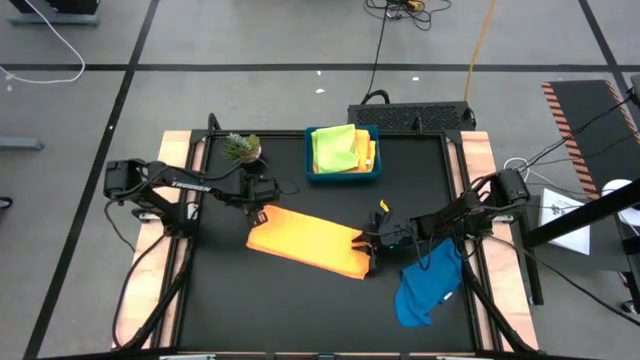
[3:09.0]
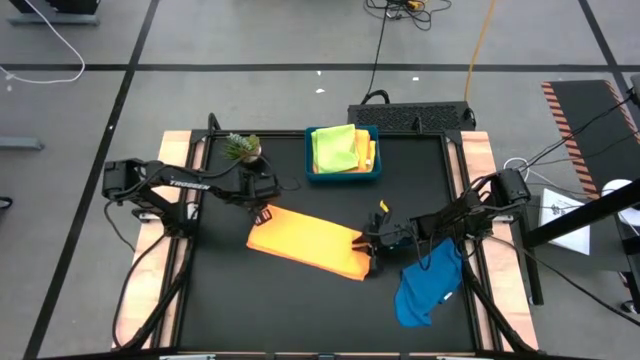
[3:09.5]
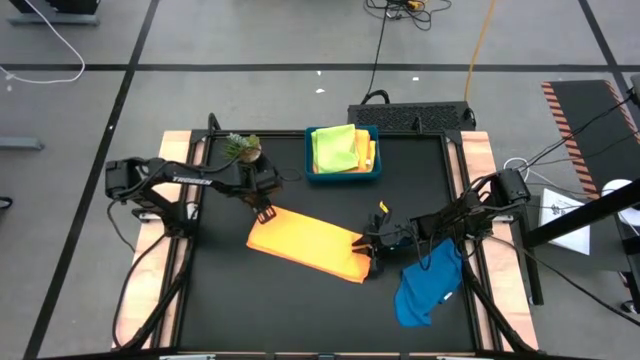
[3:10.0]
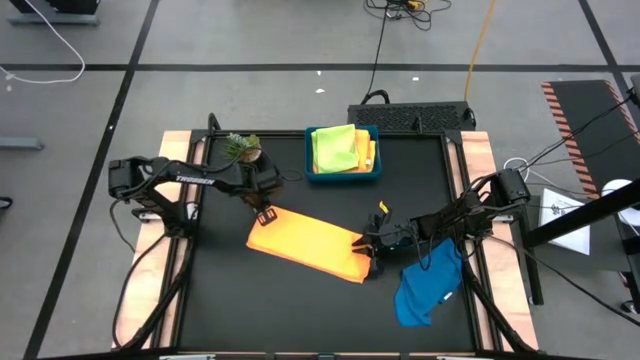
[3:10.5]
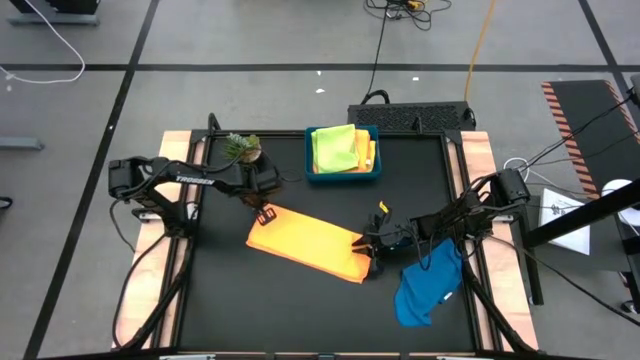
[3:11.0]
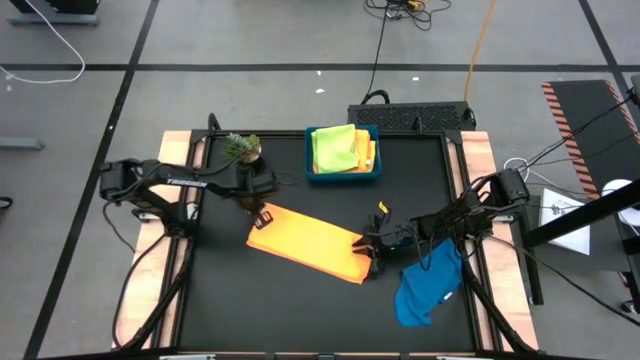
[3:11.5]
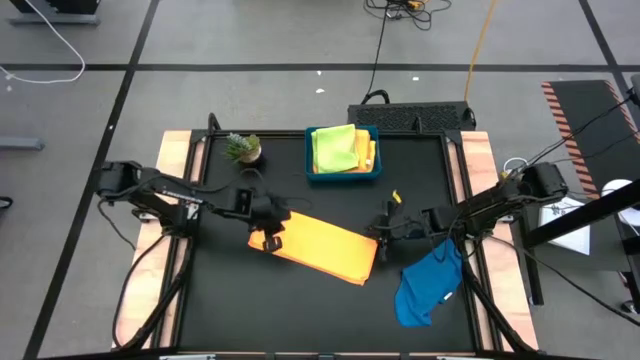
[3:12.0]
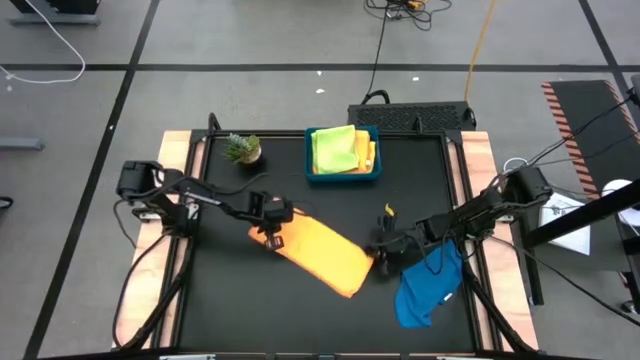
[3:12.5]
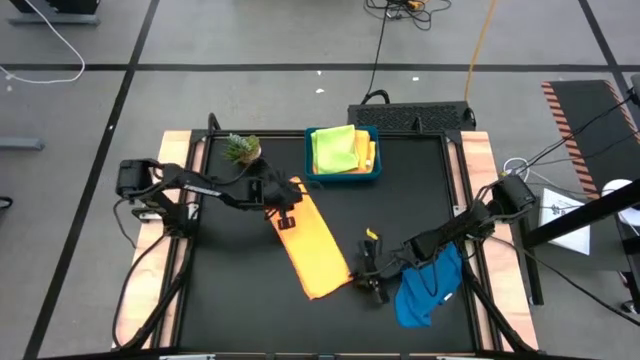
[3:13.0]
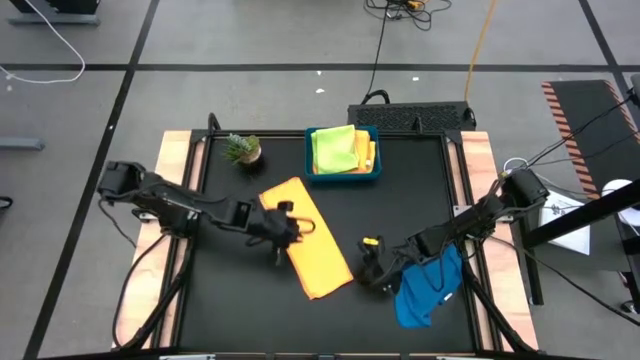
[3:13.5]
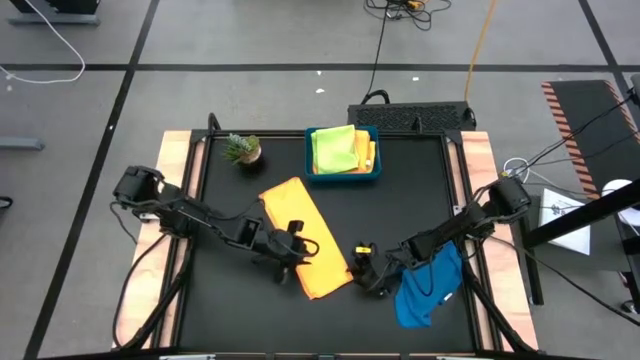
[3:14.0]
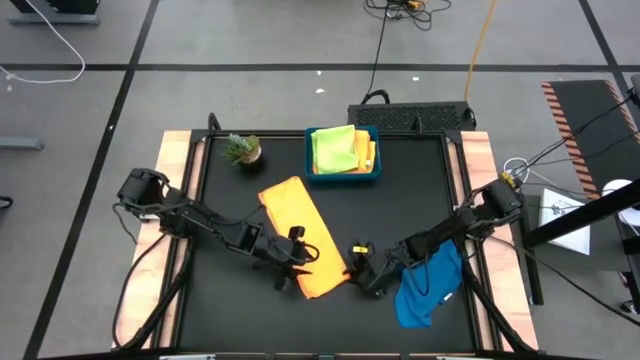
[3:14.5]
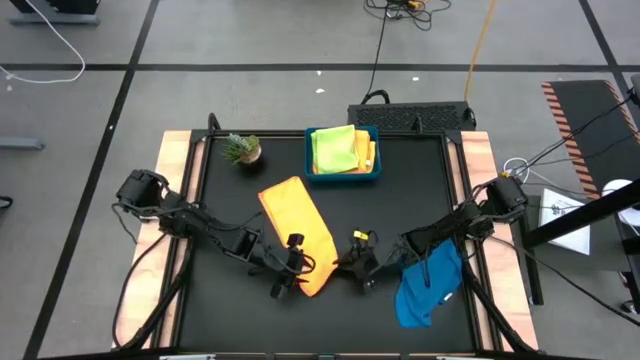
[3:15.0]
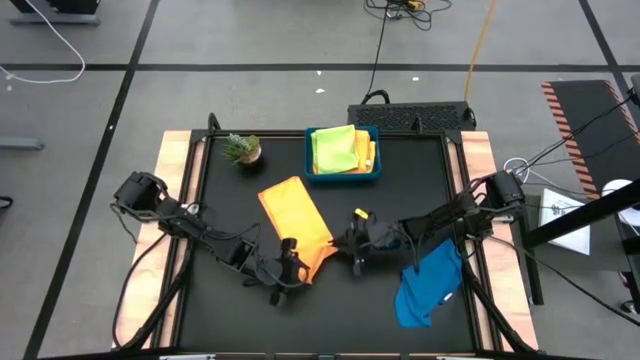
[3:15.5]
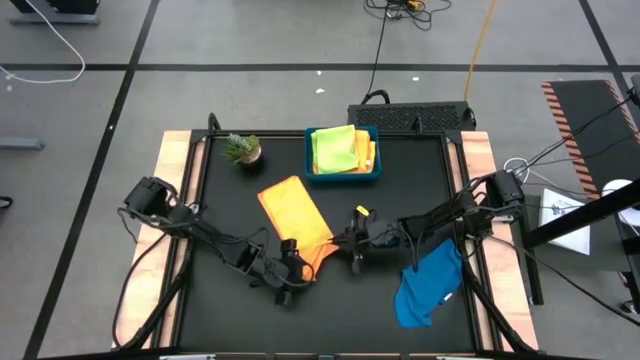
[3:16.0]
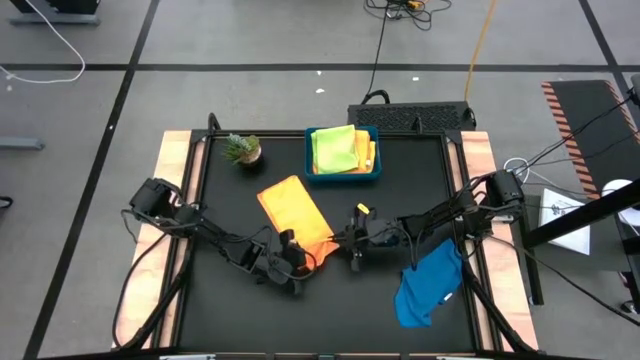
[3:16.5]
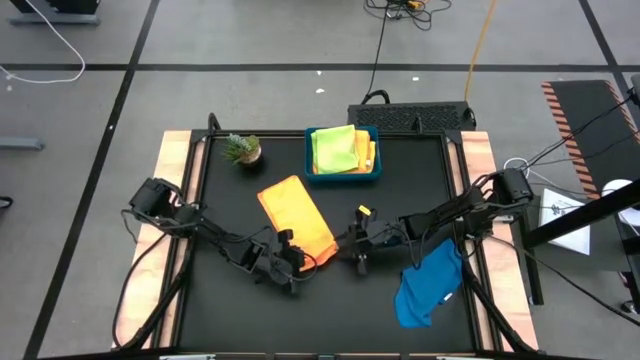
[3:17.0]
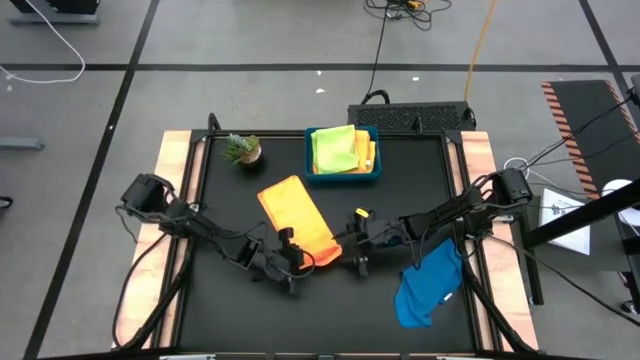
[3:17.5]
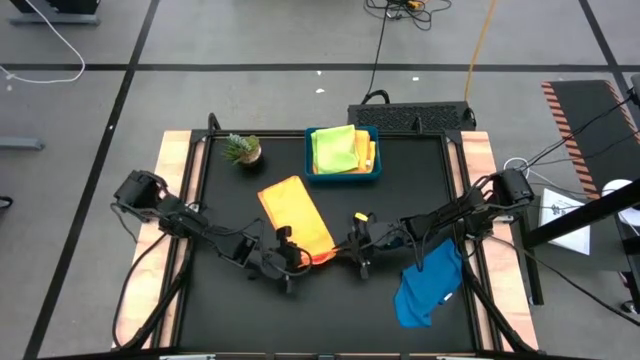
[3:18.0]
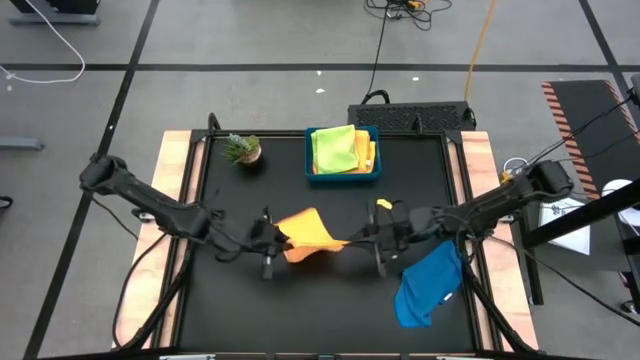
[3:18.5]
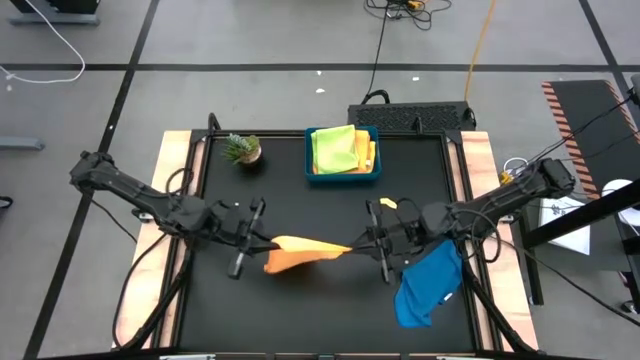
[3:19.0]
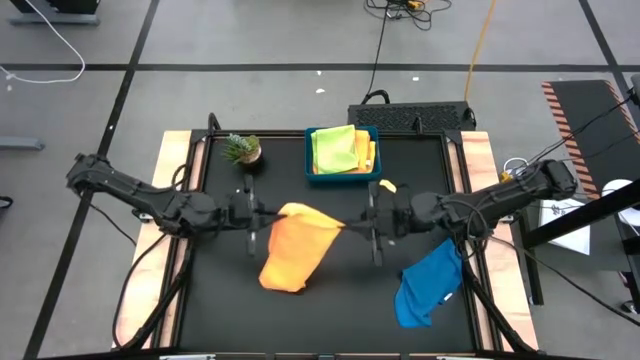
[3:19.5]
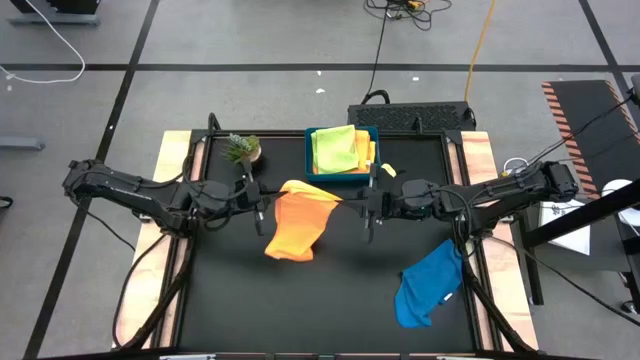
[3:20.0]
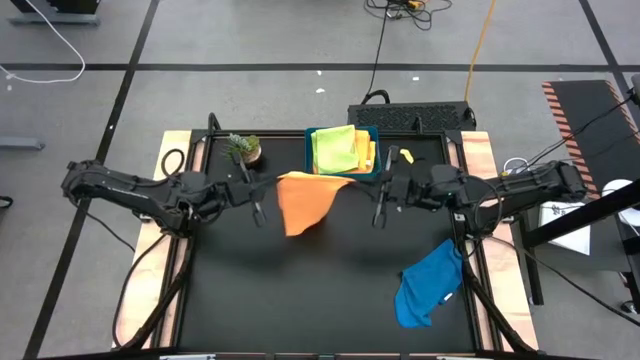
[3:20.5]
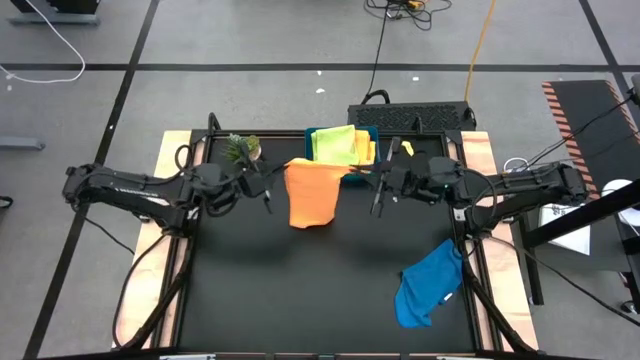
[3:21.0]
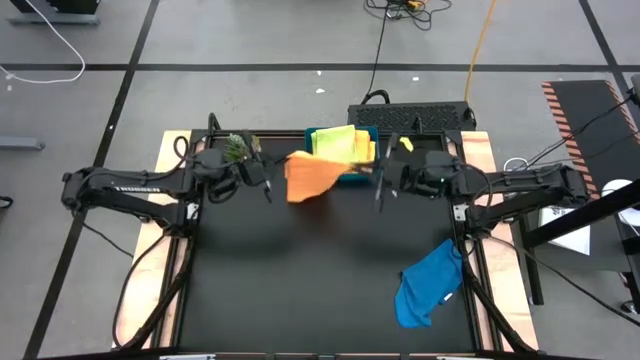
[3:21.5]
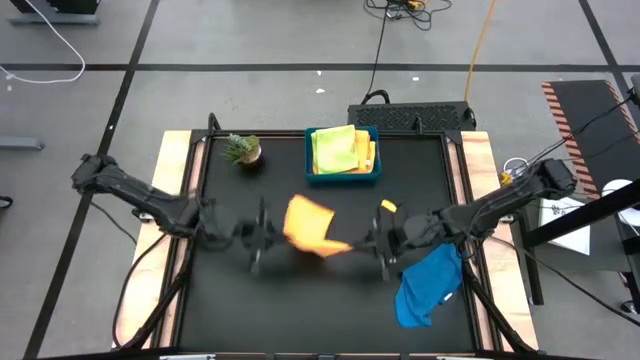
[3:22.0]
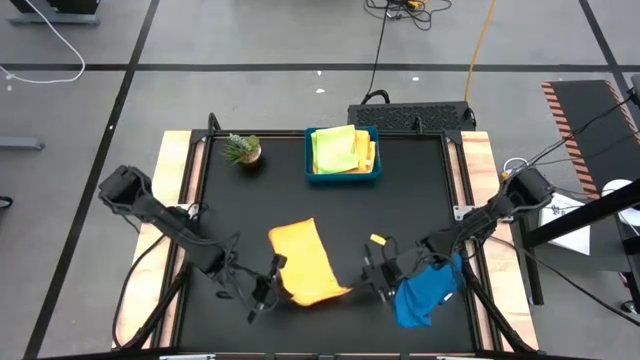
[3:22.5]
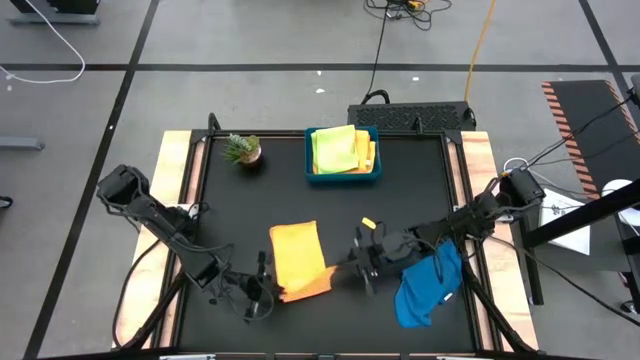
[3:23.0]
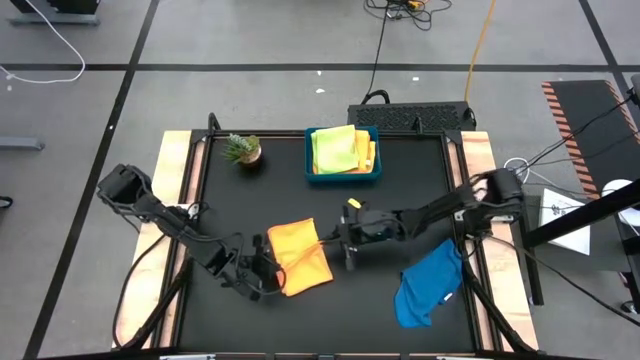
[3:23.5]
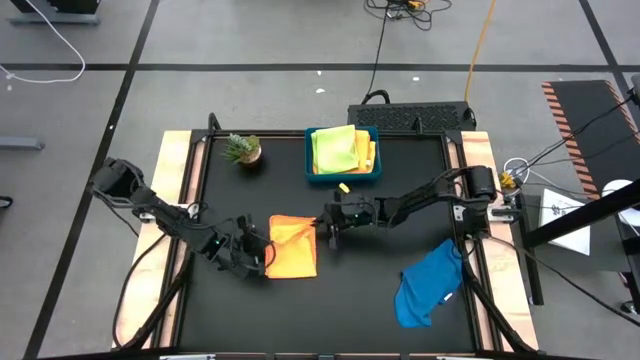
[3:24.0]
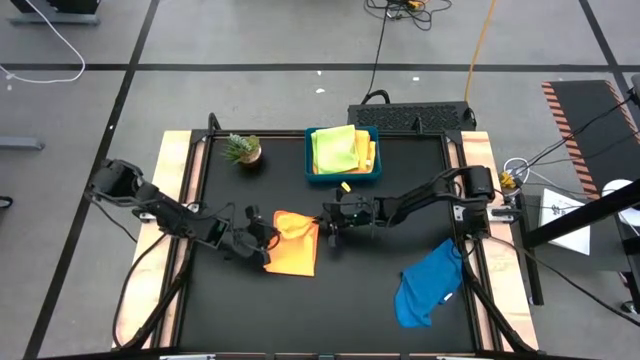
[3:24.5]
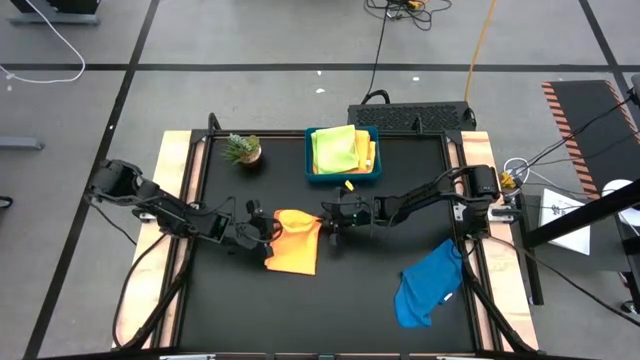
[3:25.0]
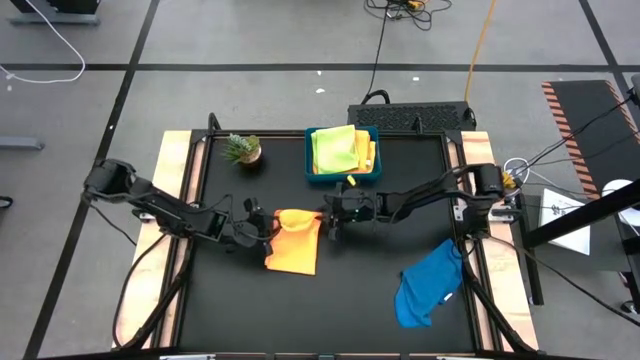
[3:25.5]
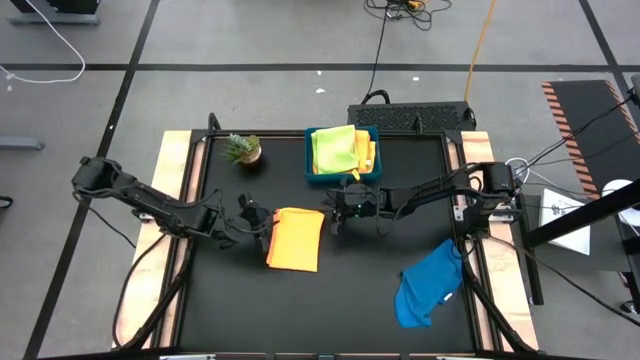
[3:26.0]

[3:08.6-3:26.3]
Task: Fold microfiber towels
Fold the orange microfiber cloth

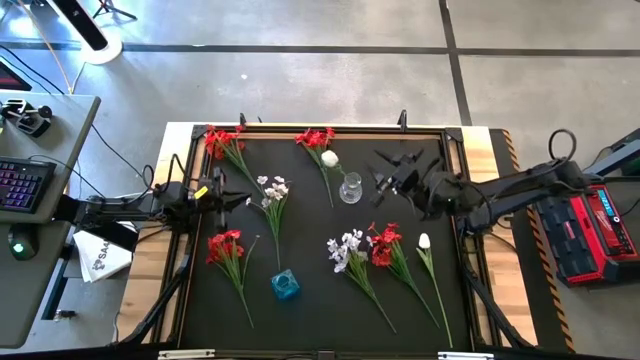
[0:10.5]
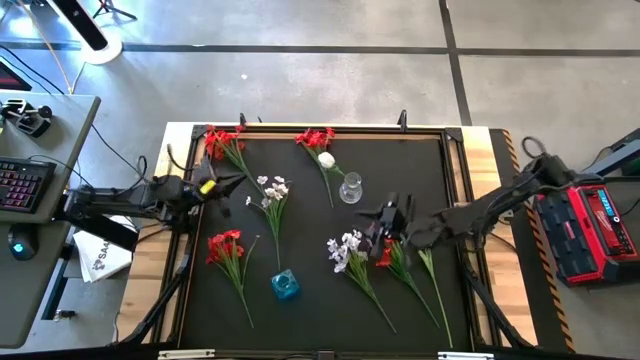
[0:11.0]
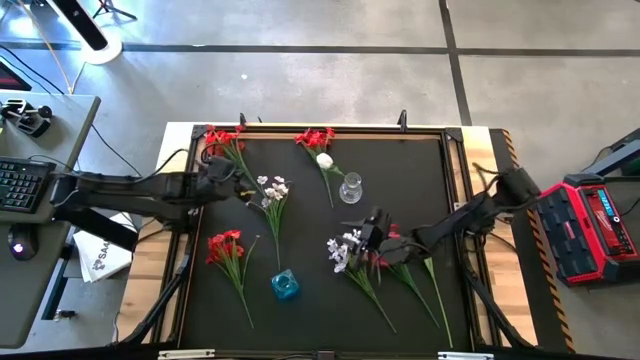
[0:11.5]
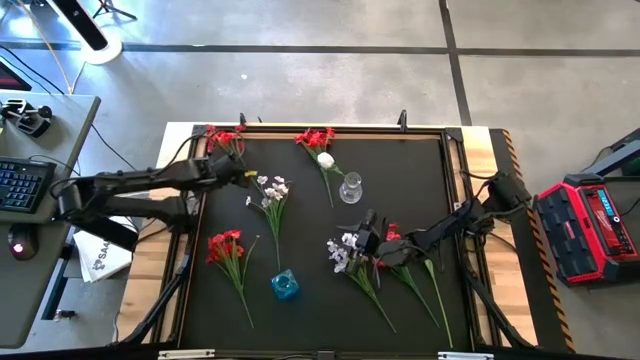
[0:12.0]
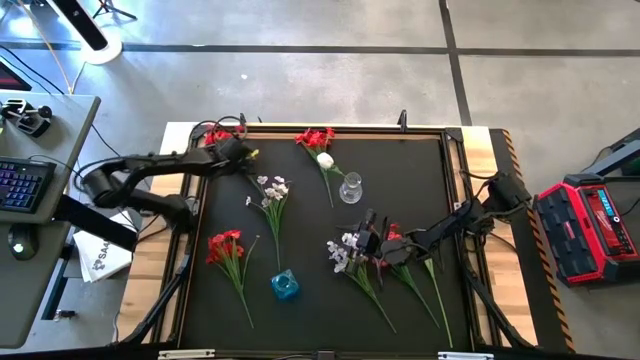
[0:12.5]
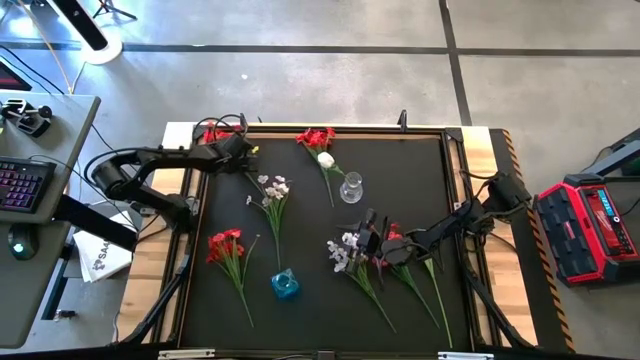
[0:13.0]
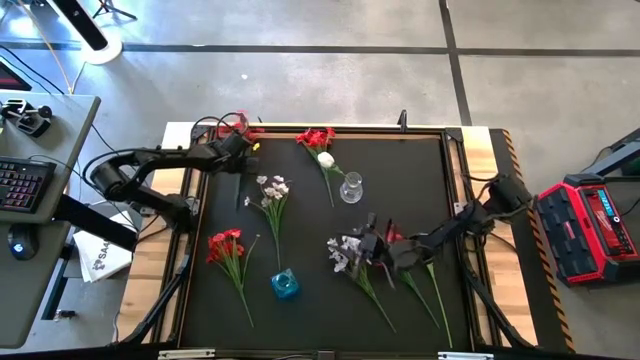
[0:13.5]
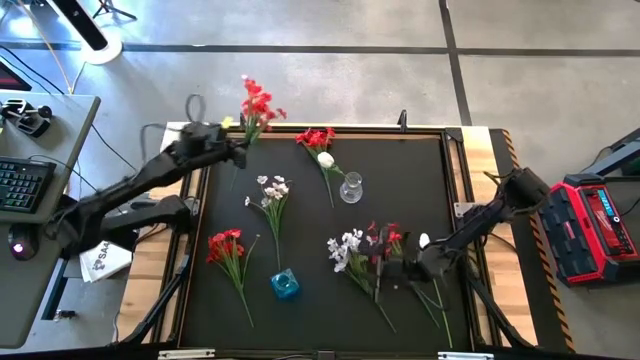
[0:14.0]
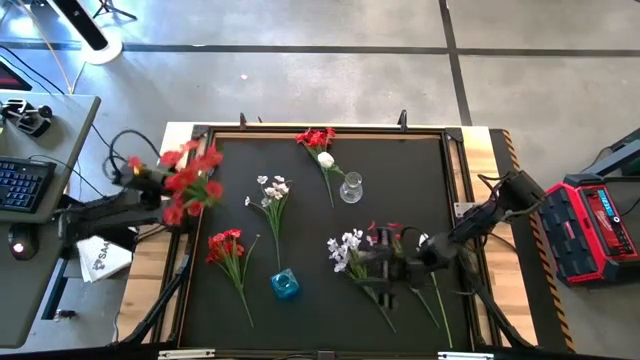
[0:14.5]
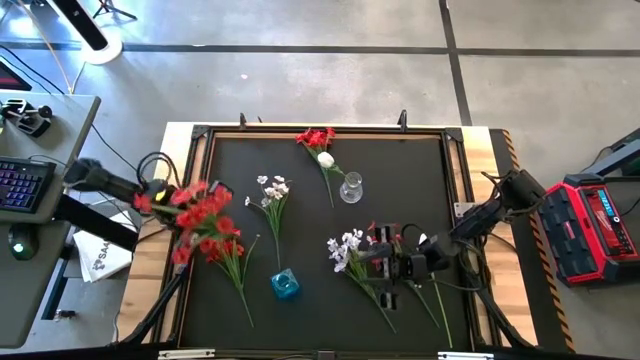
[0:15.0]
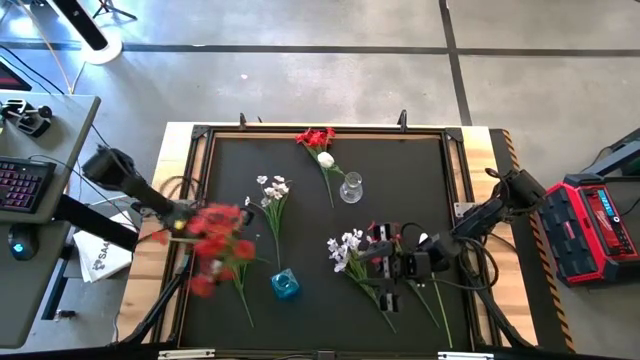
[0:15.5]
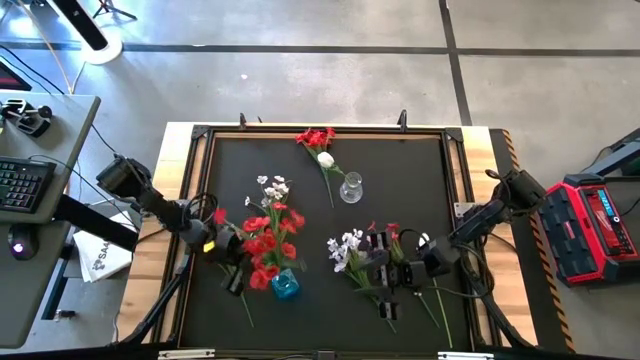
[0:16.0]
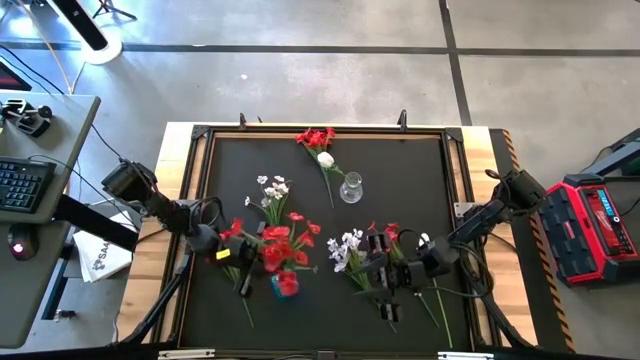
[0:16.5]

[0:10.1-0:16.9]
Task: Sort flowers into vase by color
Put the red flowers into the blue vase
